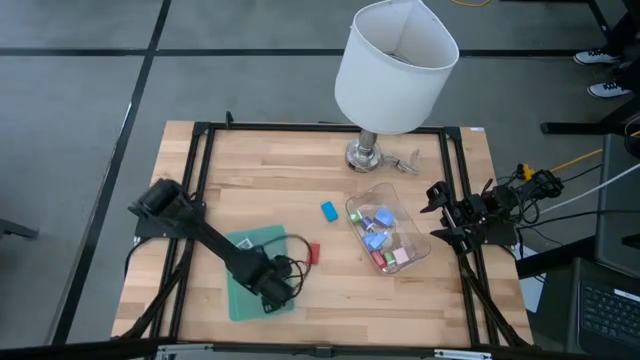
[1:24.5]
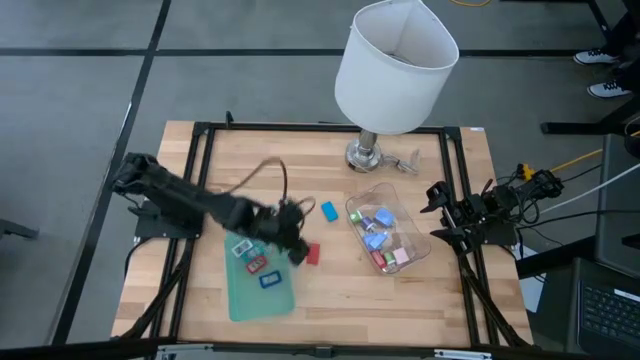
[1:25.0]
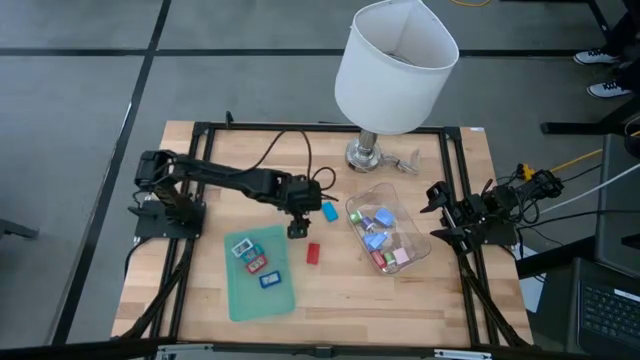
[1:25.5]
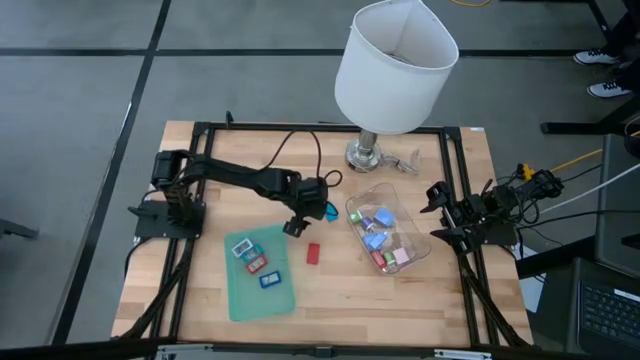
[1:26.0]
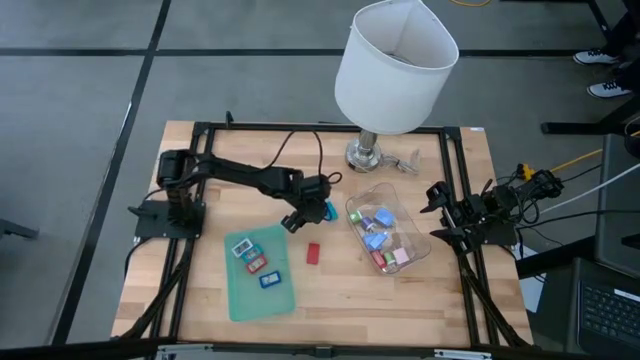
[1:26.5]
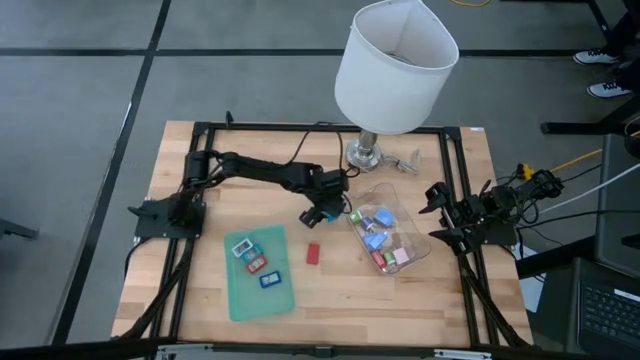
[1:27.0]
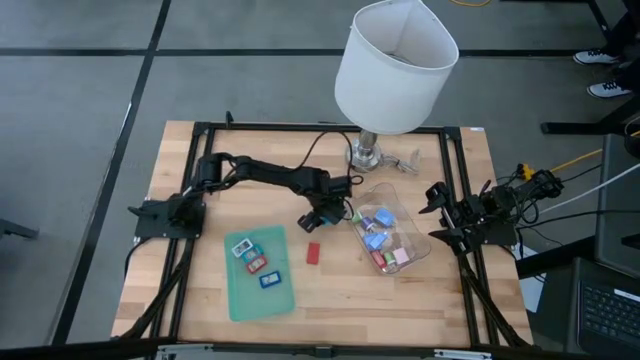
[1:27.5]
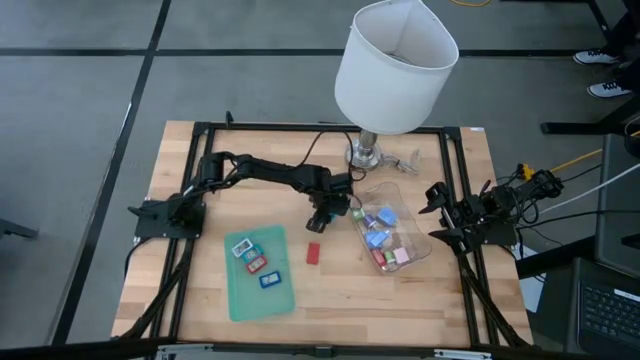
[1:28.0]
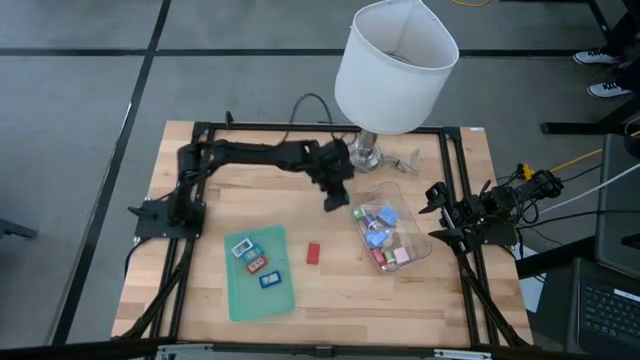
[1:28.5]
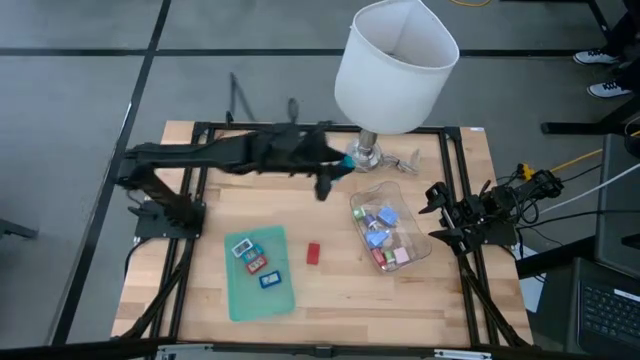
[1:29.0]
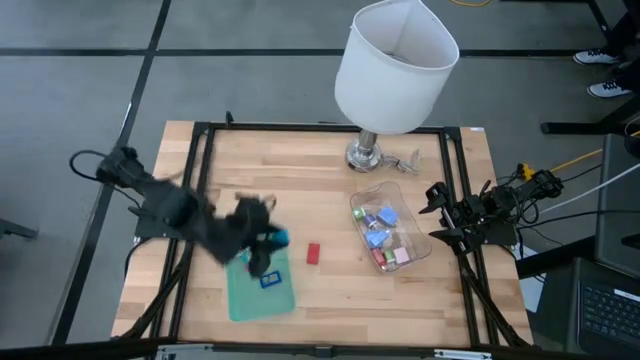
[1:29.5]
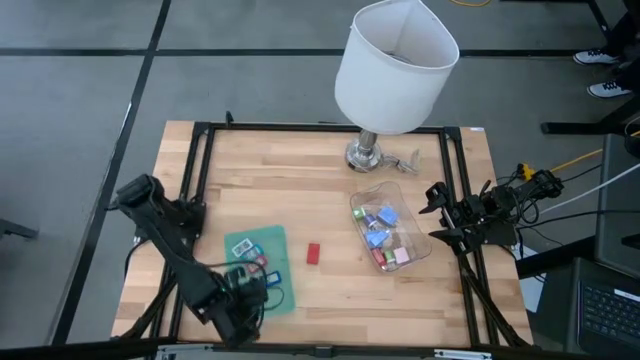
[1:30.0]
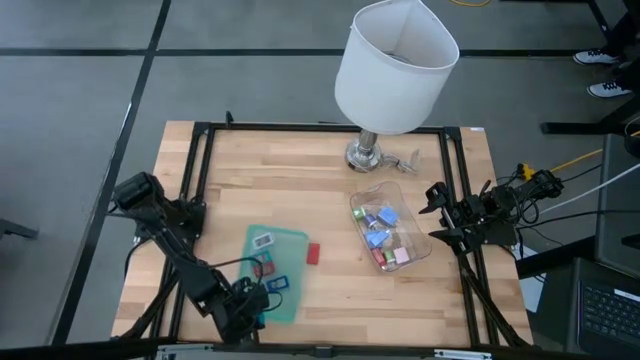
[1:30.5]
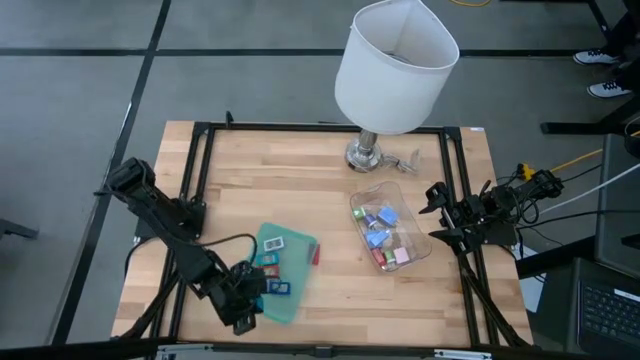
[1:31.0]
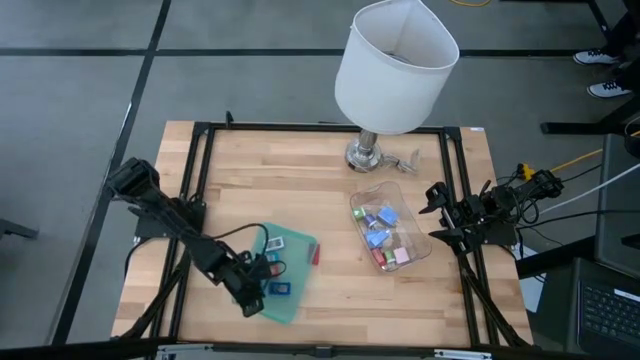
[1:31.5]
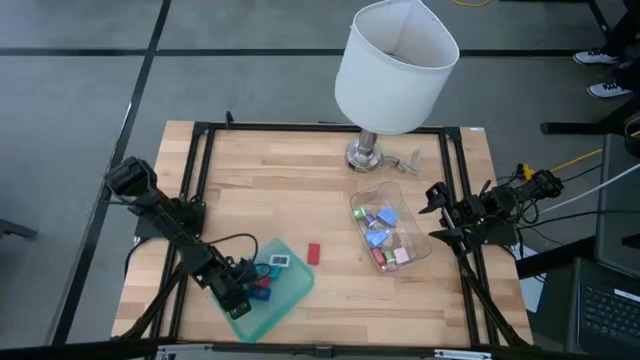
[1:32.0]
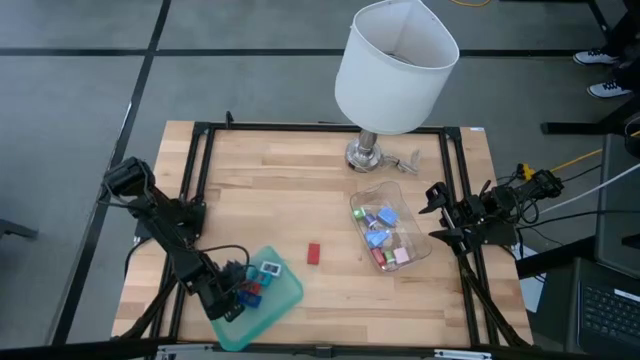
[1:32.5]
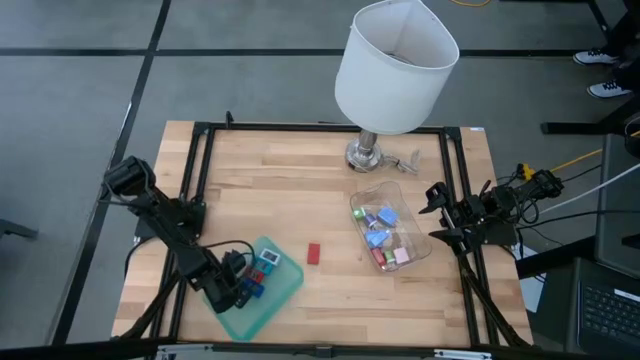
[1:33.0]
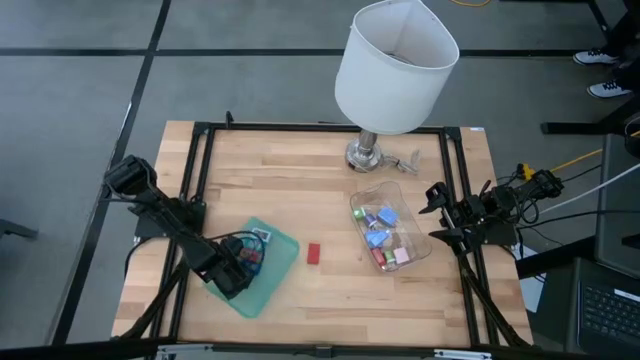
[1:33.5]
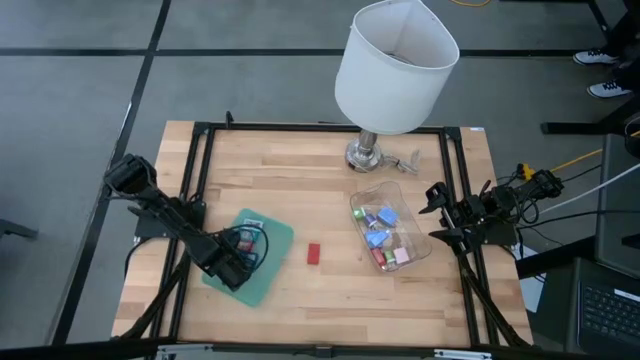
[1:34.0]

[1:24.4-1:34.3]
Task: Pick & Place Office items
Put the light blue digital clock into the green bin

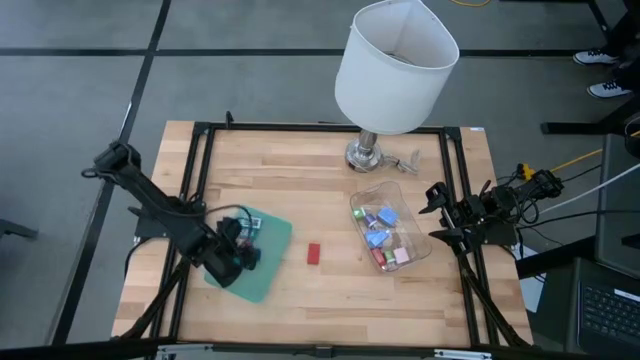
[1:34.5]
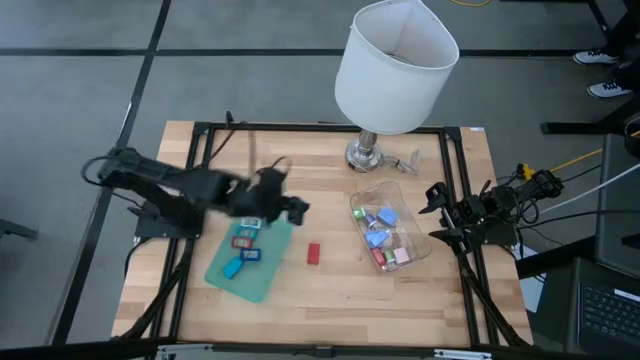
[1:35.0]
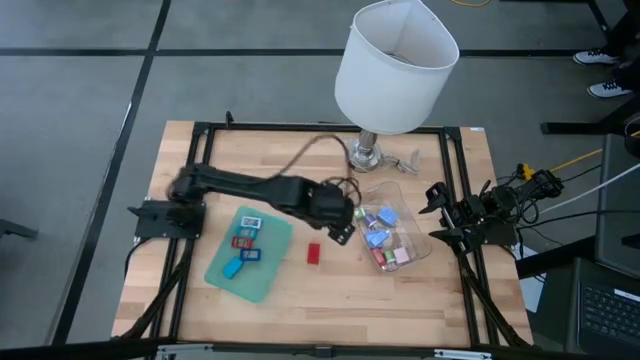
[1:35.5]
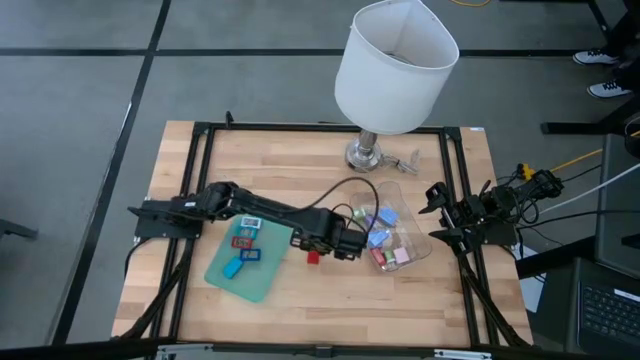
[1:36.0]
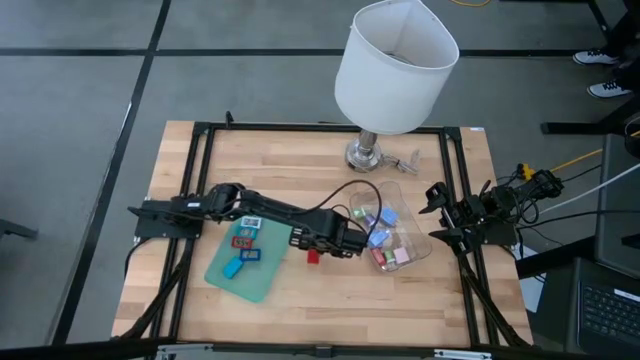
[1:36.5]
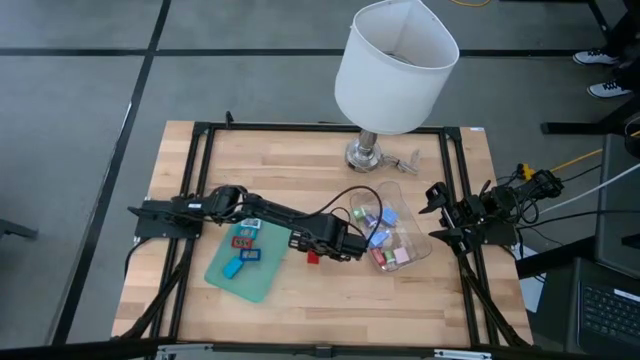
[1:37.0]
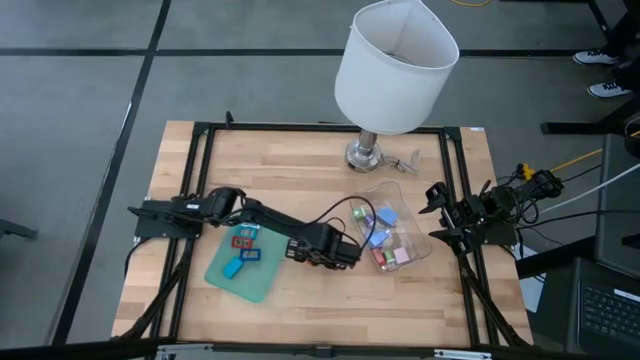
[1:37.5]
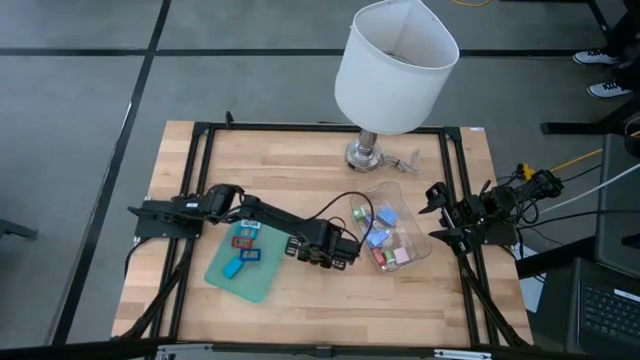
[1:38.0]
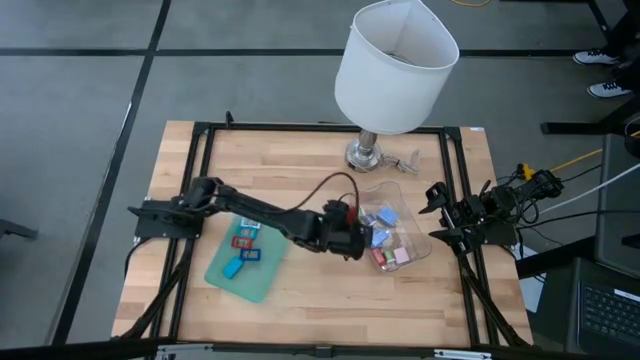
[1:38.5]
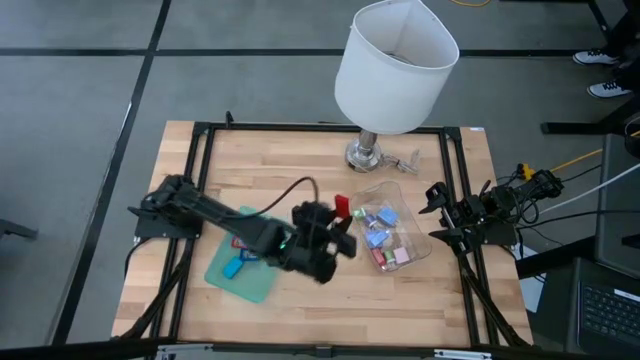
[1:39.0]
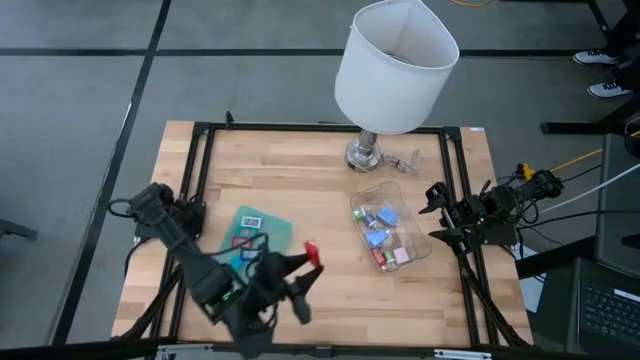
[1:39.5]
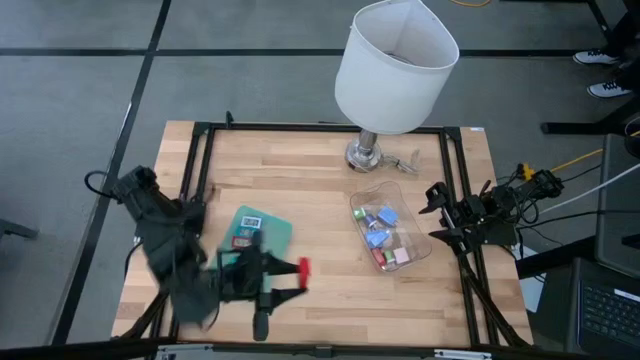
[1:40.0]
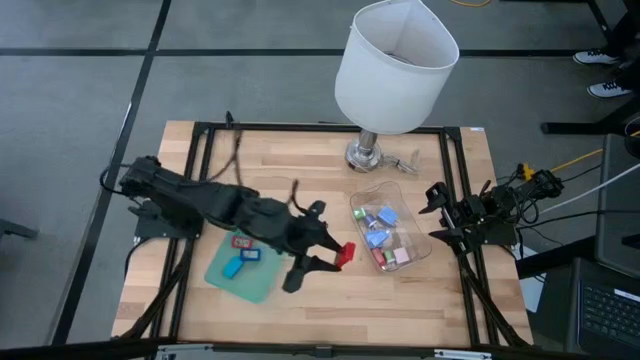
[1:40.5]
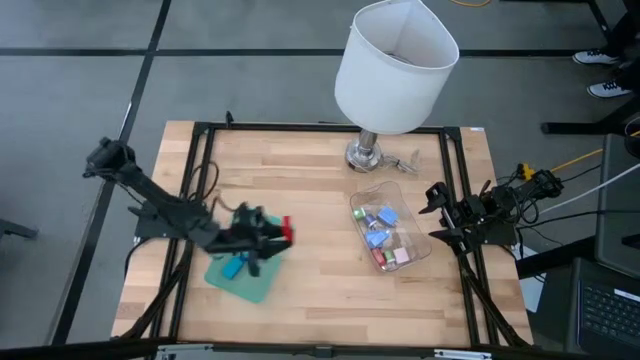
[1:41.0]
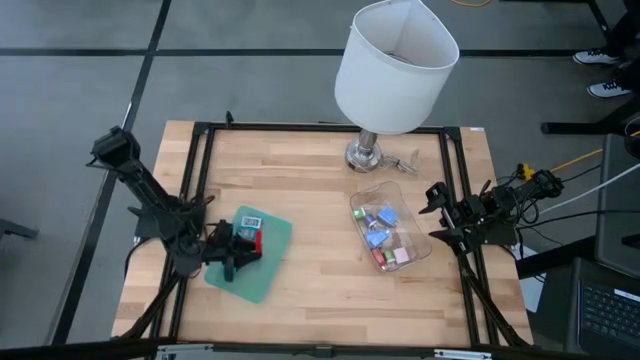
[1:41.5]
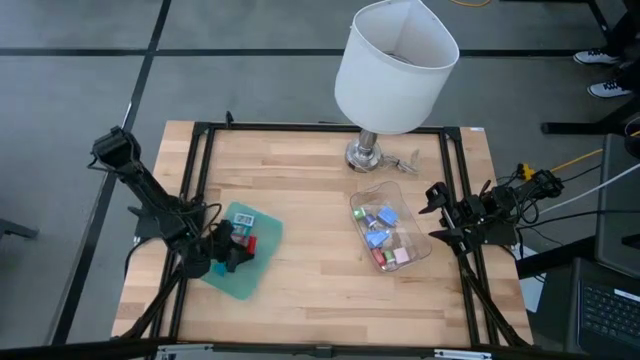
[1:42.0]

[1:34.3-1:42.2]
Put the red digital clock into the green bin
